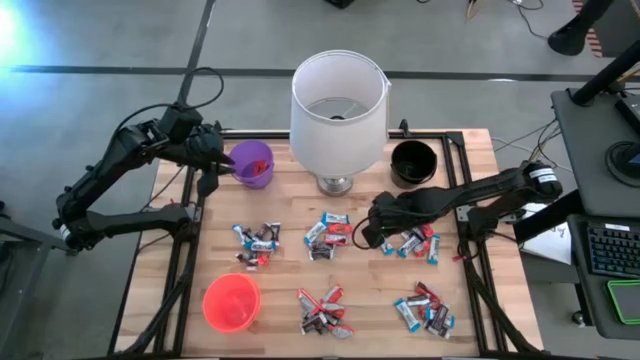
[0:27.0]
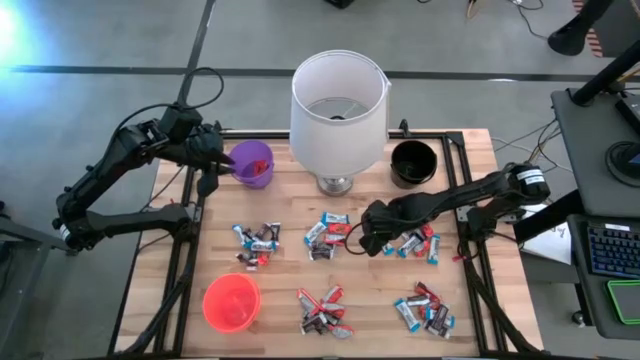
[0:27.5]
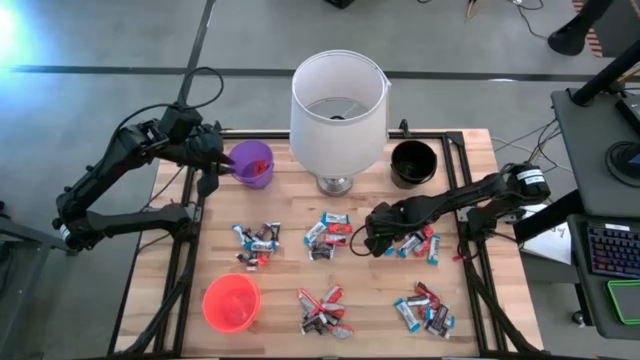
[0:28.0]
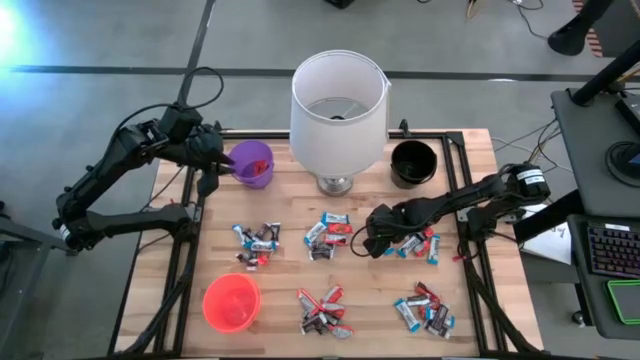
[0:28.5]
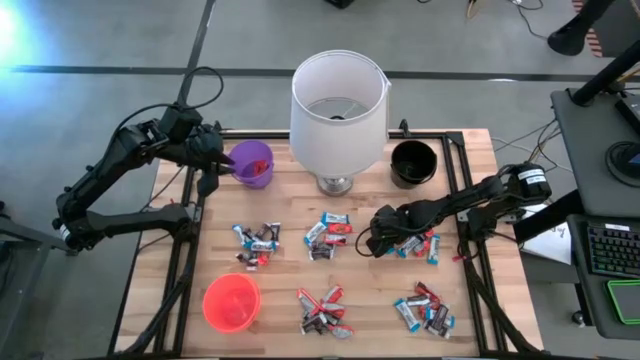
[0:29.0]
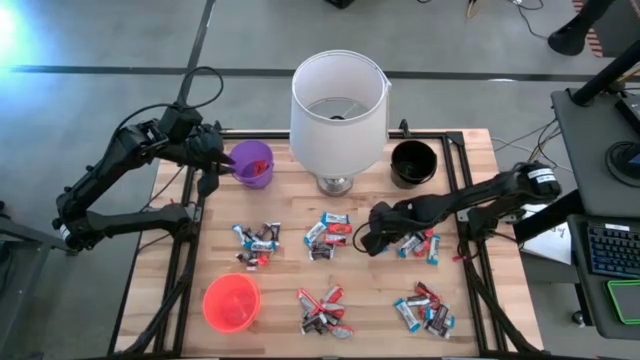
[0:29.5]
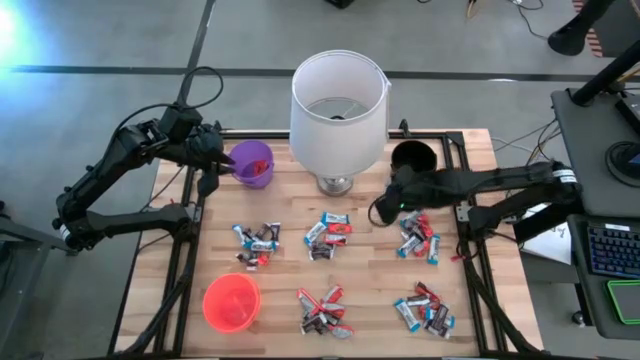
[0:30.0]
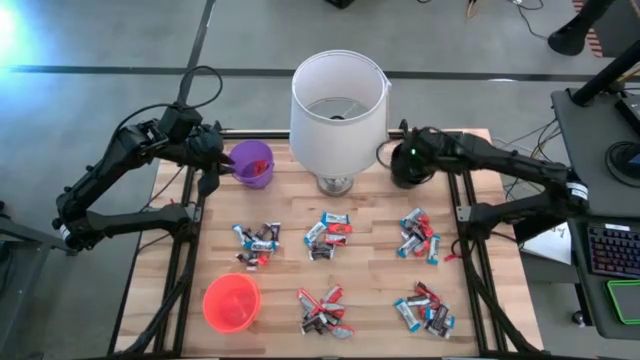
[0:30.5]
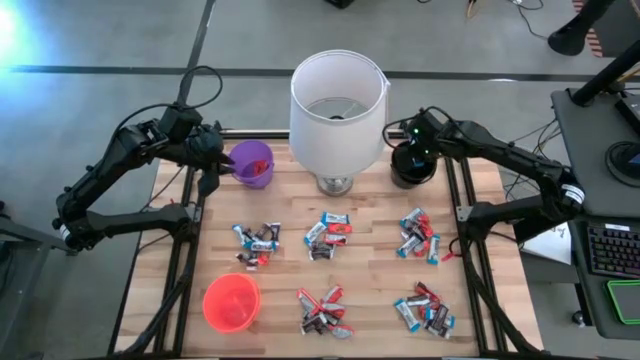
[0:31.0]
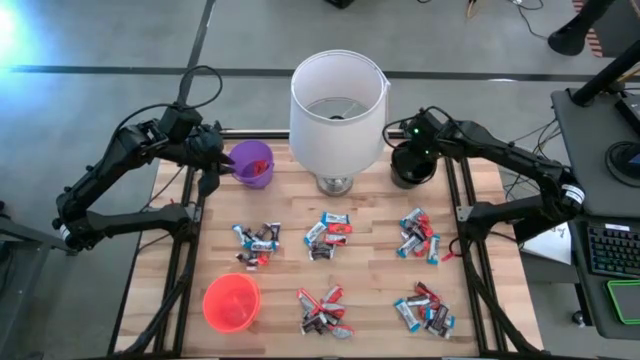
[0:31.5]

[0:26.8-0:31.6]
Task: Sort candy
Put the white chocolate into the black bin

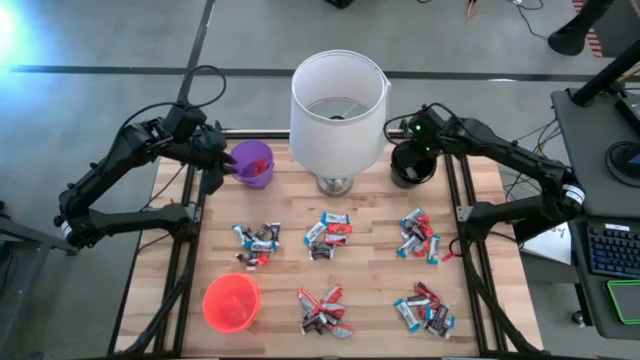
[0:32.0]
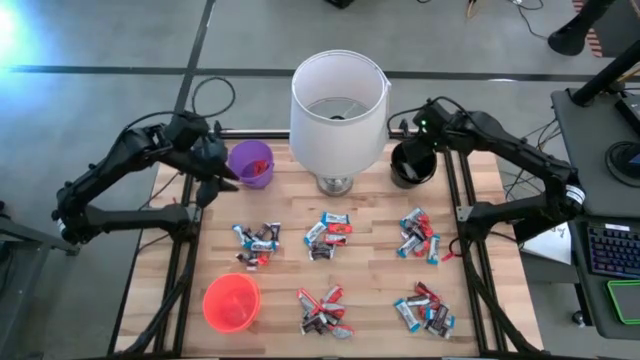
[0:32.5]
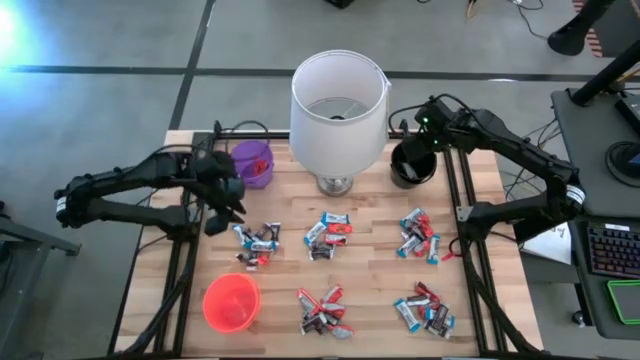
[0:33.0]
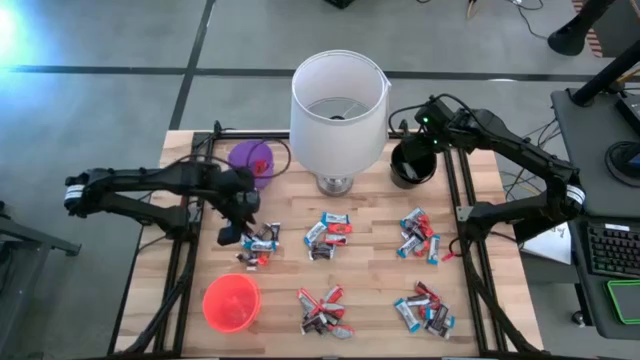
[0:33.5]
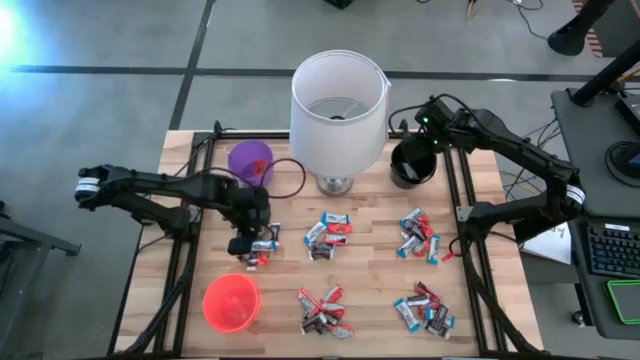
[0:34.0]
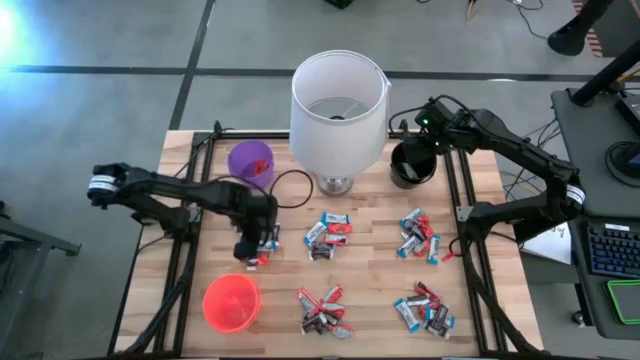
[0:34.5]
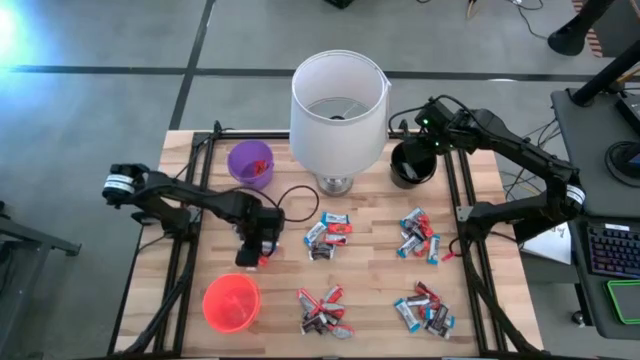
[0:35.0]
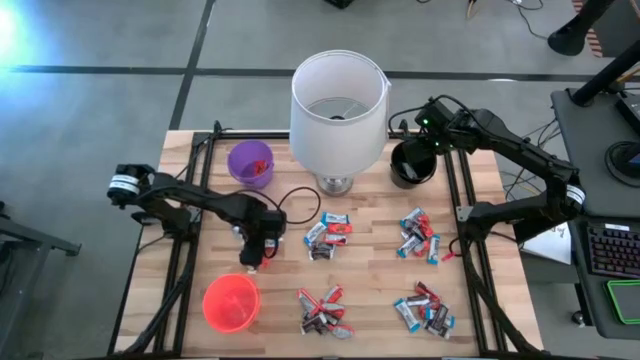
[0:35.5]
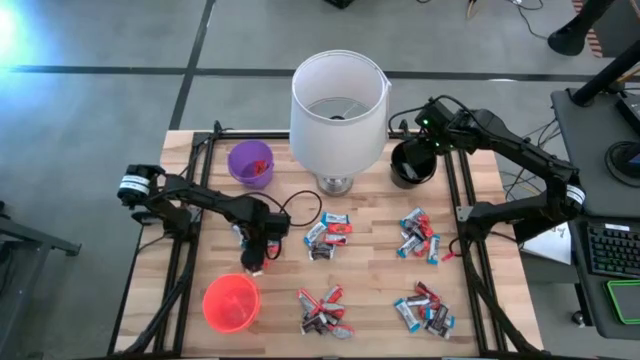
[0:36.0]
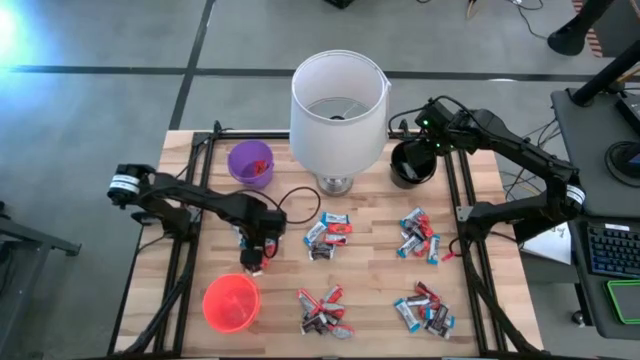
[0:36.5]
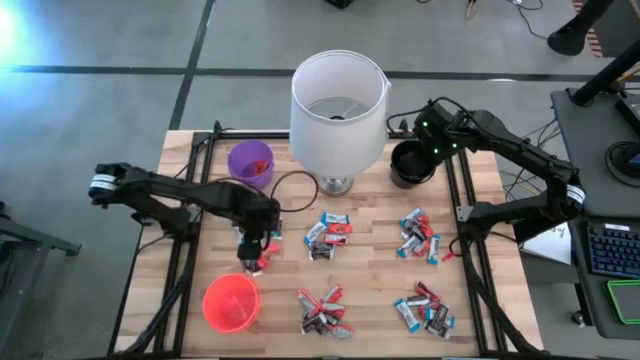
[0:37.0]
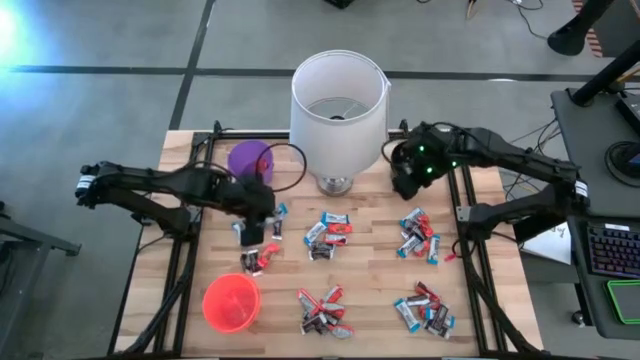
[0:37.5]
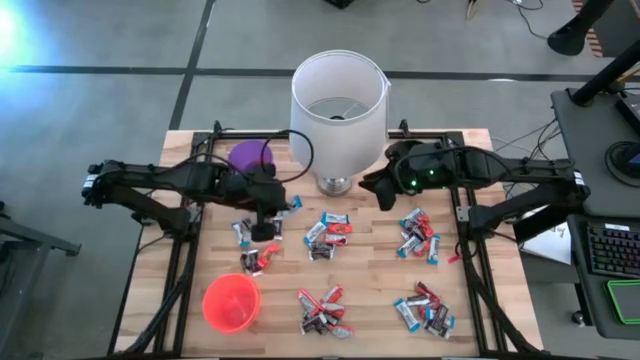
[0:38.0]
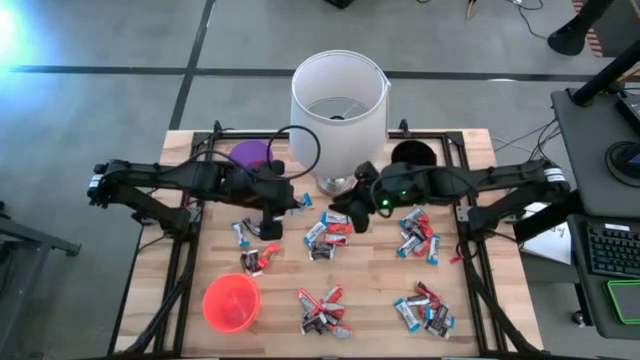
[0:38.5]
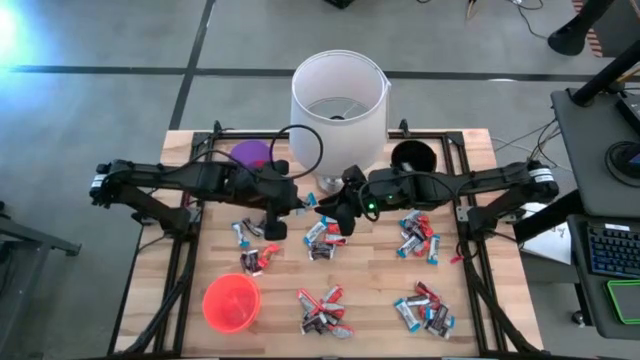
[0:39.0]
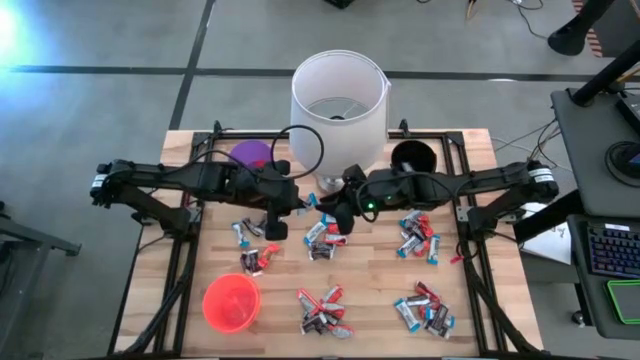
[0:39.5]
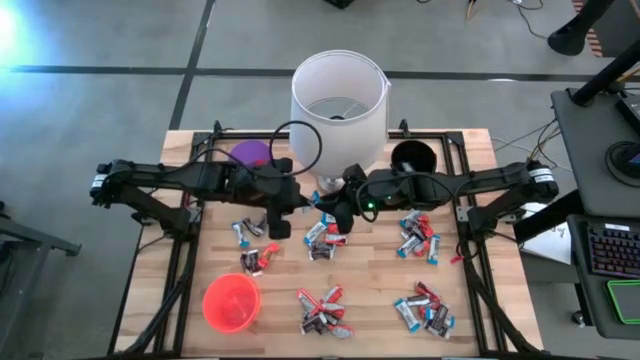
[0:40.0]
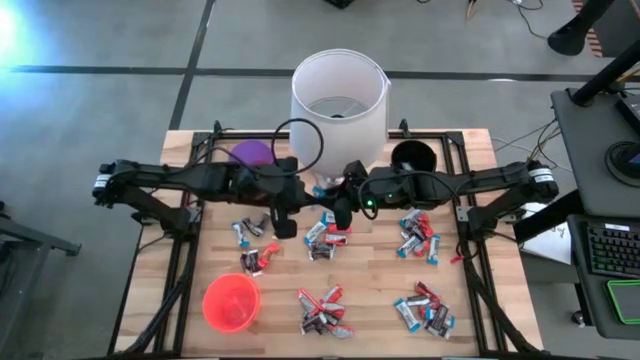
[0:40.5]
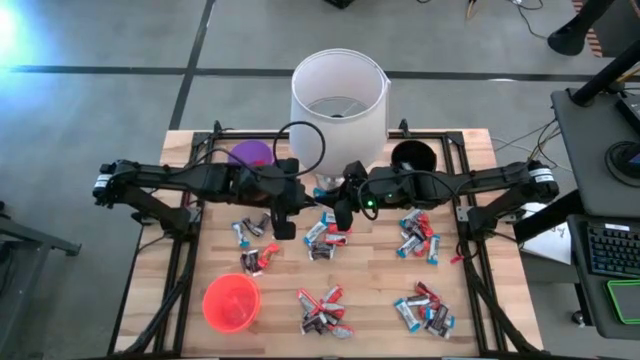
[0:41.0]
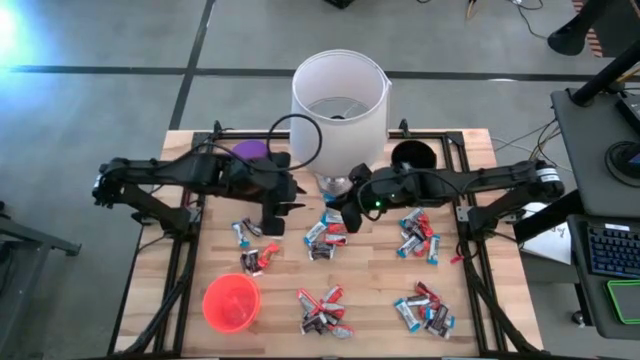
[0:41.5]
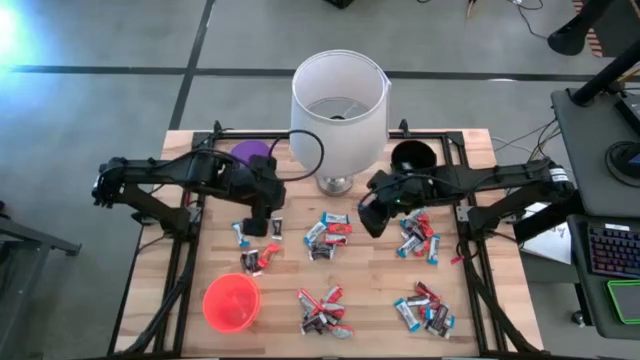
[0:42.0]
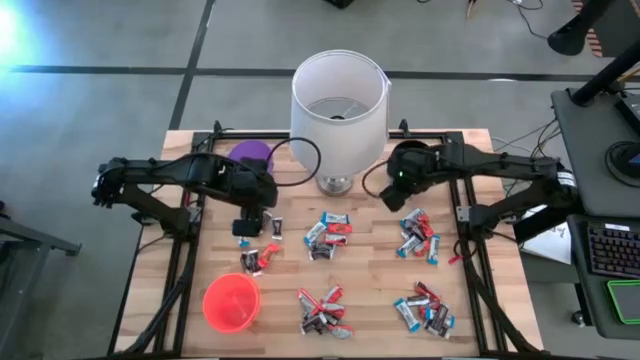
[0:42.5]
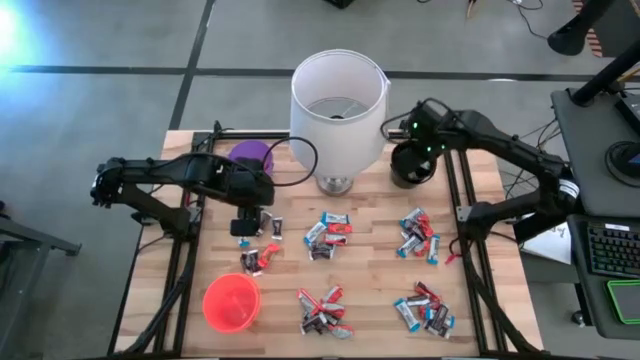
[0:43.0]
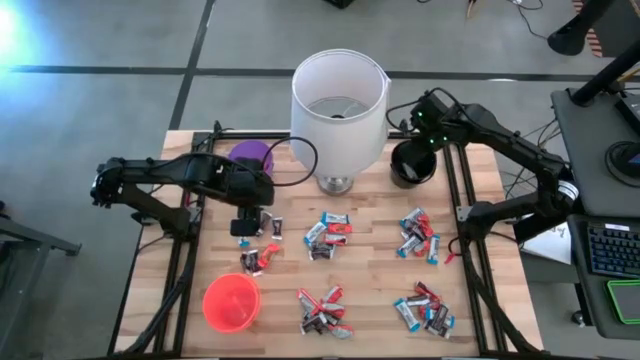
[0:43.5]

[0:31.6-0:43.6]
Put the white chocolate into the black bin

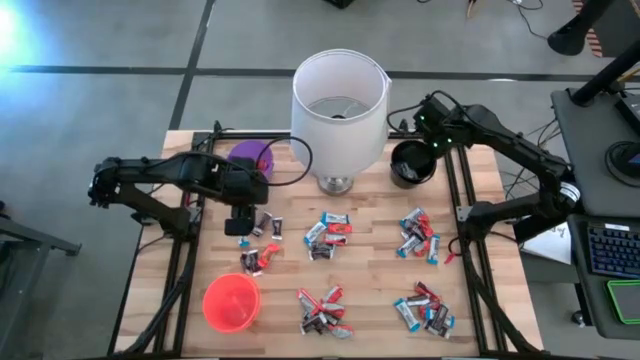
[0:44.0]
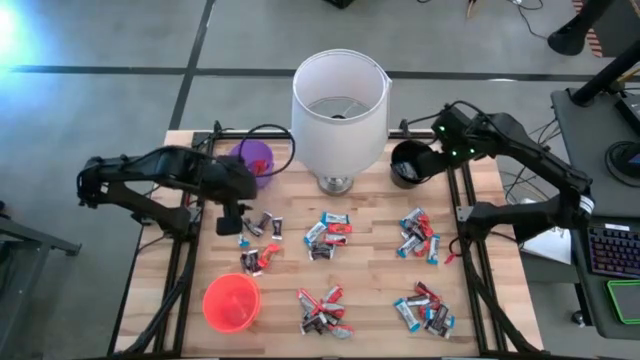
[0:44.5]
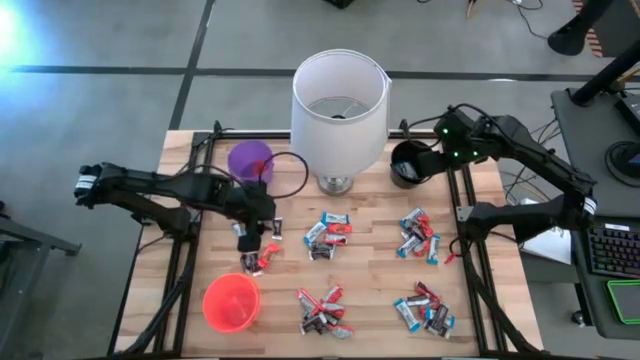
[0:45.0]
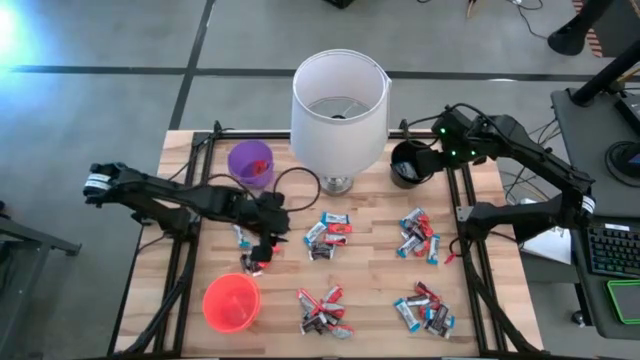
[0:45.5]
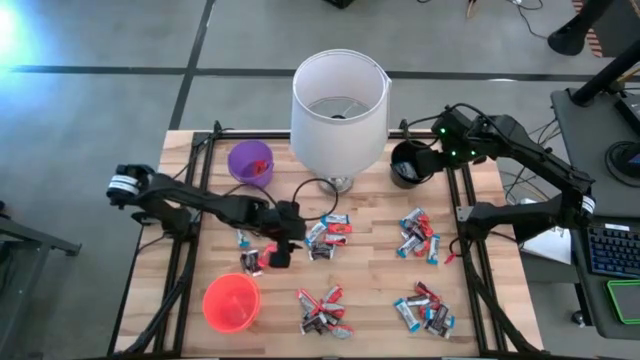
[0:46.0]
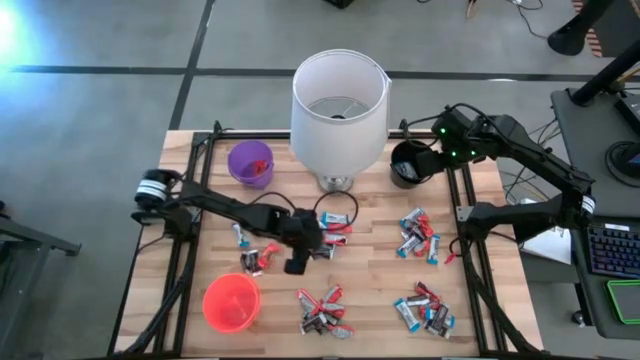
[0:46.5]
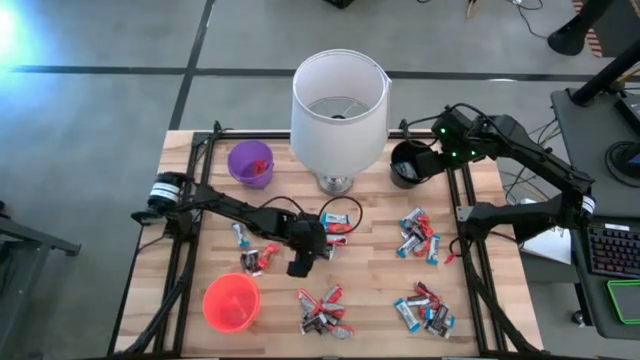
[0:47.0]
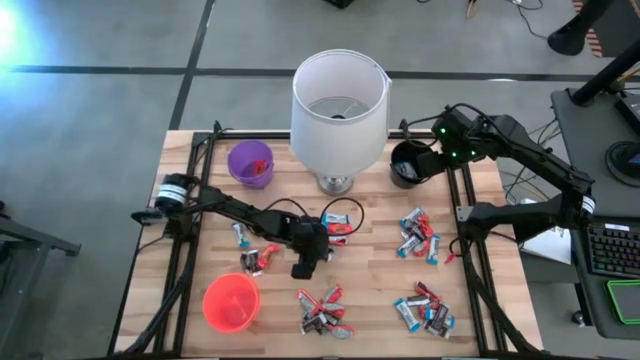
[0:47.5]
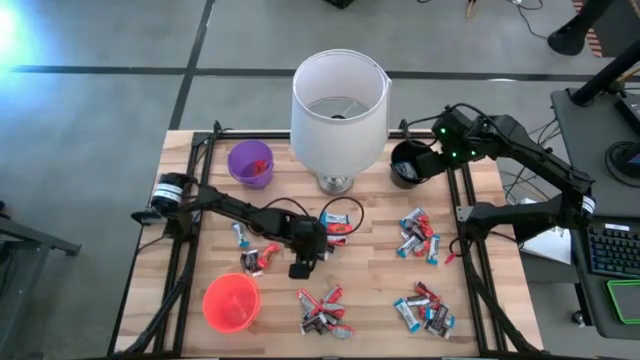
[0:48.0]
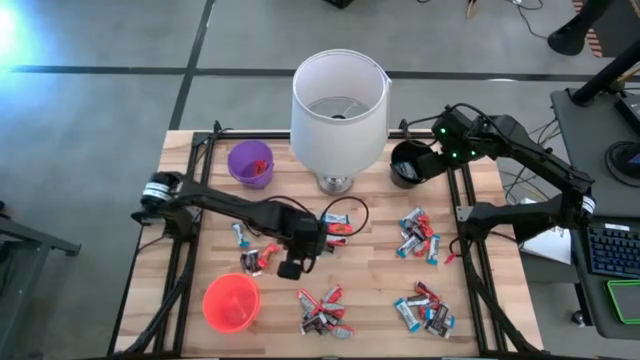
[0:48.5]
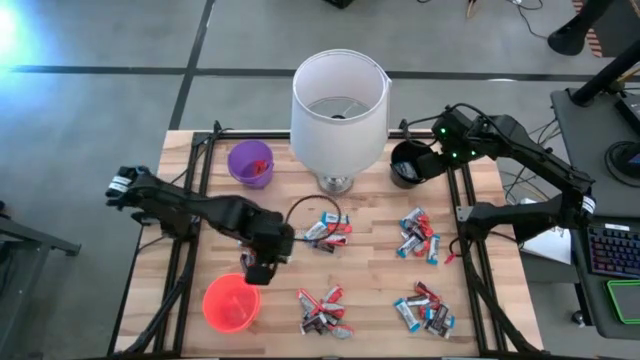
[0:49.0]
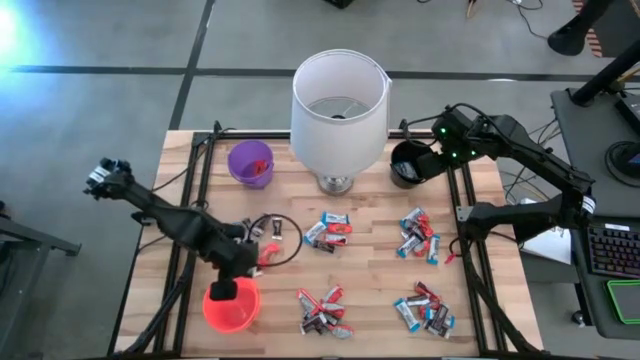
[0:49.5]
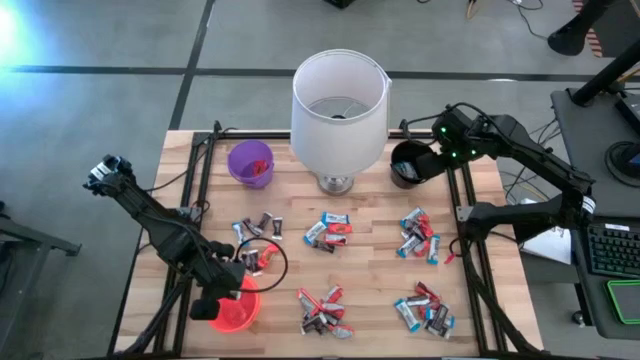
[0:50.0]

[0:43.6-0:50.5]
Put the black chocolate into the orange bucket
